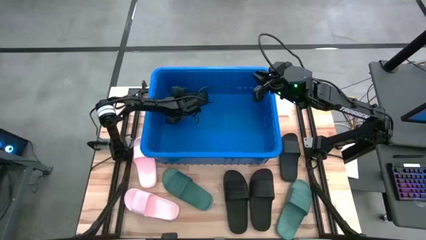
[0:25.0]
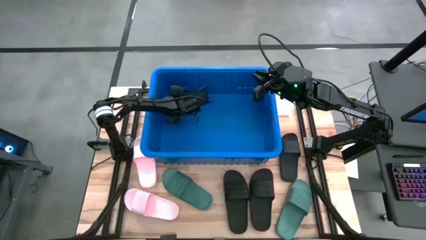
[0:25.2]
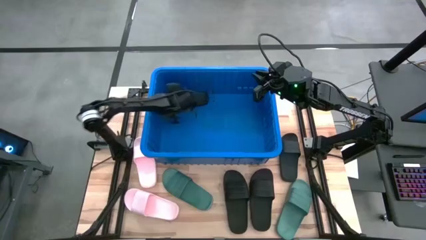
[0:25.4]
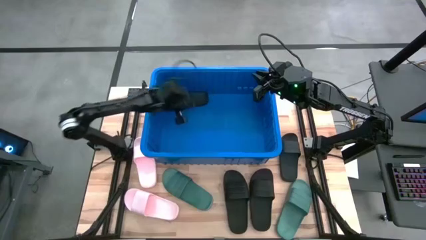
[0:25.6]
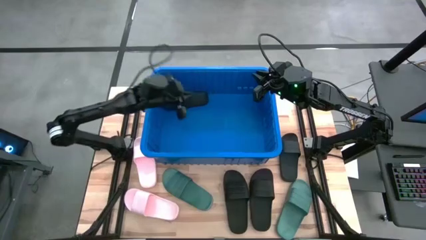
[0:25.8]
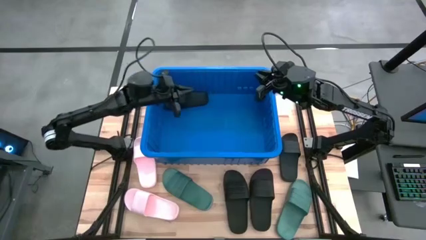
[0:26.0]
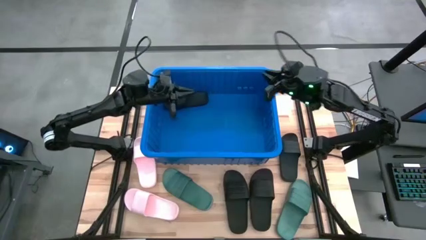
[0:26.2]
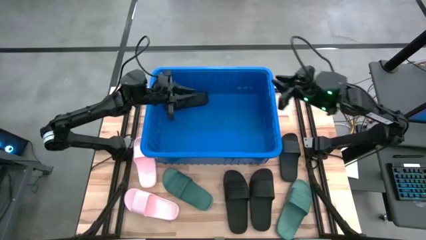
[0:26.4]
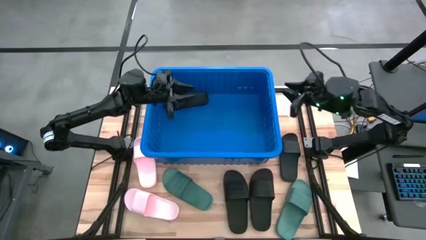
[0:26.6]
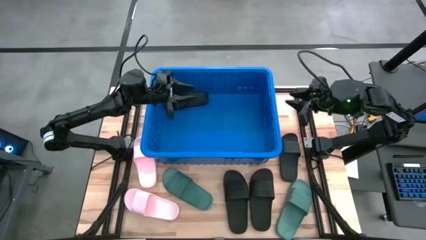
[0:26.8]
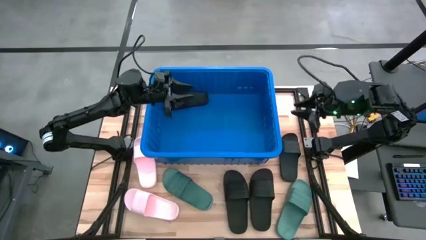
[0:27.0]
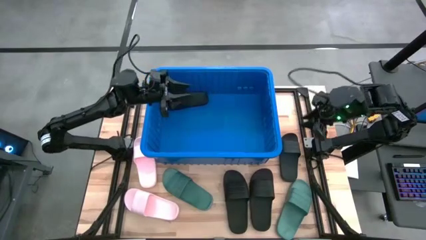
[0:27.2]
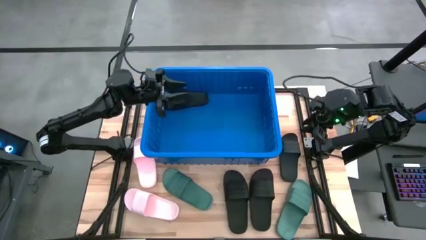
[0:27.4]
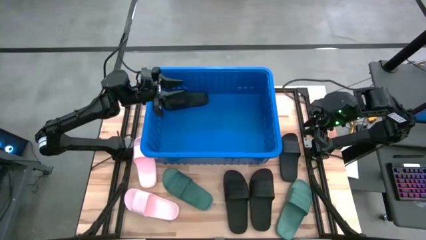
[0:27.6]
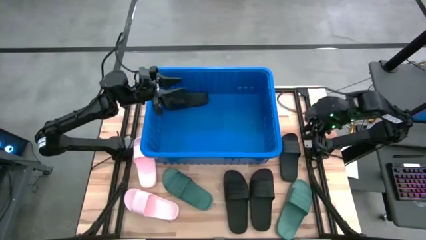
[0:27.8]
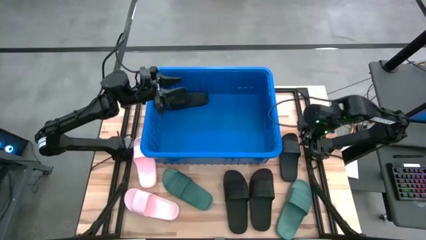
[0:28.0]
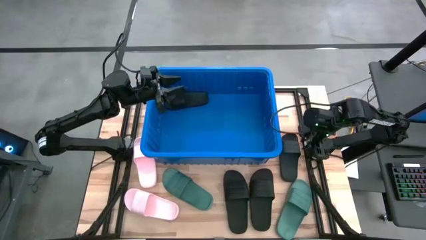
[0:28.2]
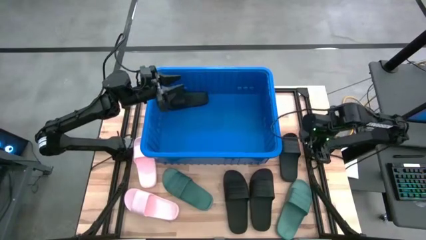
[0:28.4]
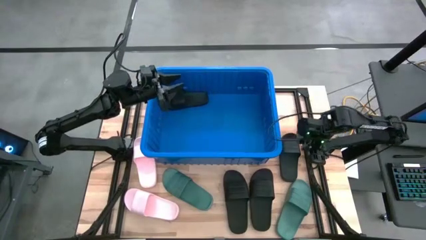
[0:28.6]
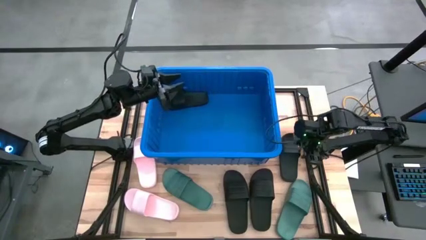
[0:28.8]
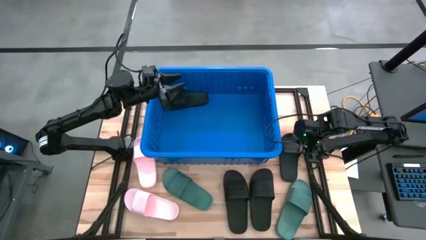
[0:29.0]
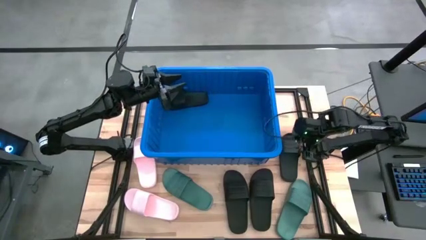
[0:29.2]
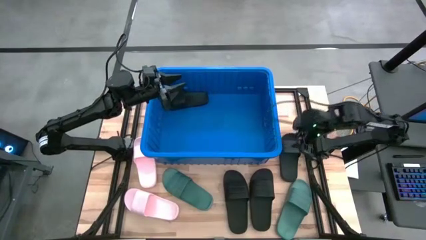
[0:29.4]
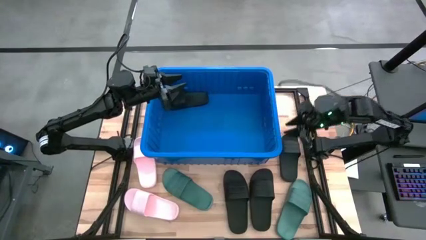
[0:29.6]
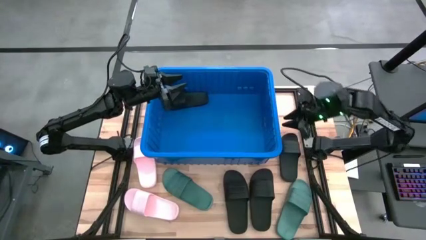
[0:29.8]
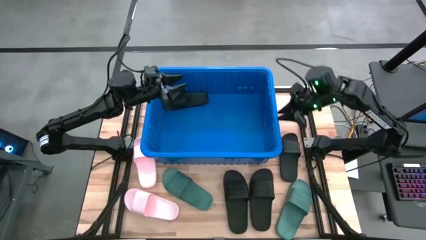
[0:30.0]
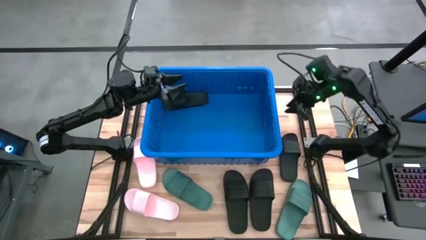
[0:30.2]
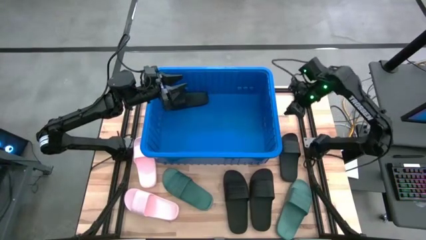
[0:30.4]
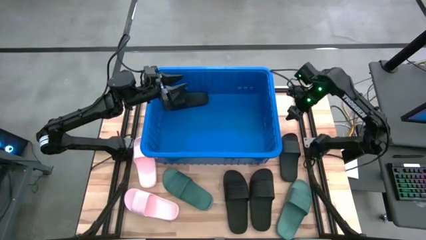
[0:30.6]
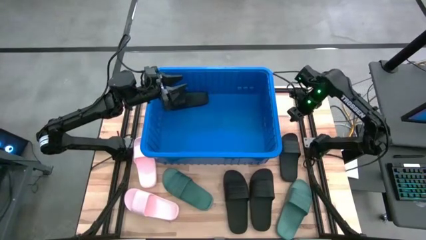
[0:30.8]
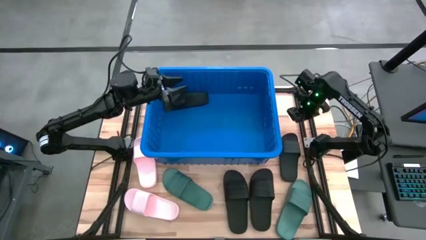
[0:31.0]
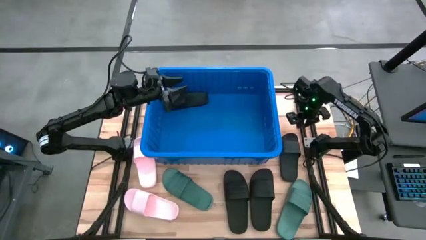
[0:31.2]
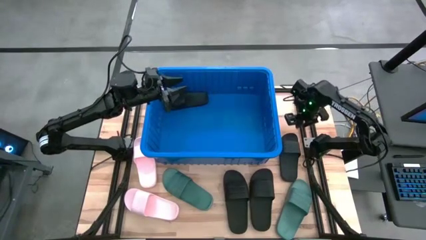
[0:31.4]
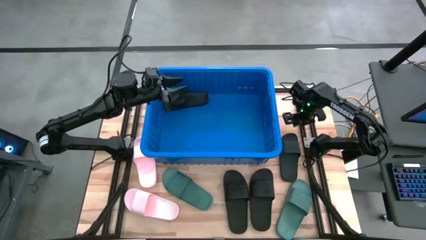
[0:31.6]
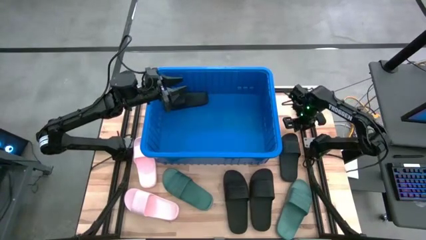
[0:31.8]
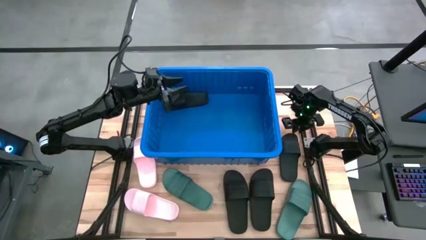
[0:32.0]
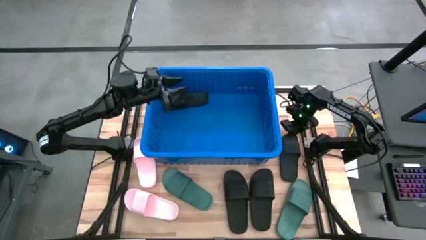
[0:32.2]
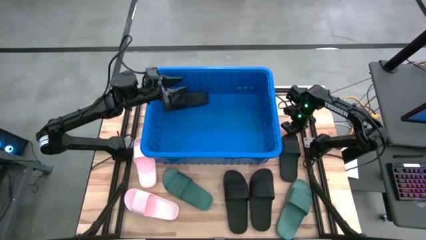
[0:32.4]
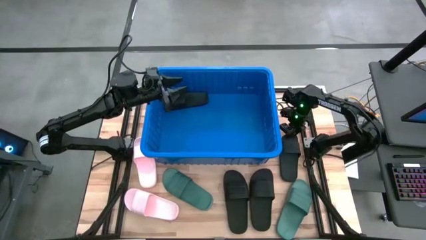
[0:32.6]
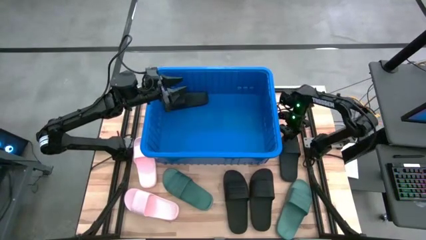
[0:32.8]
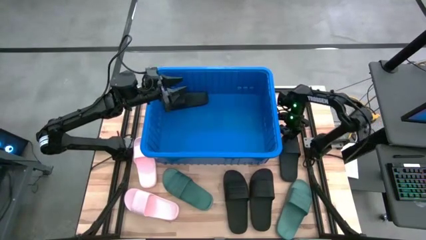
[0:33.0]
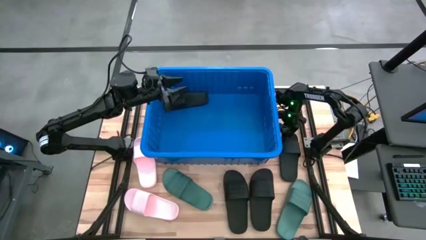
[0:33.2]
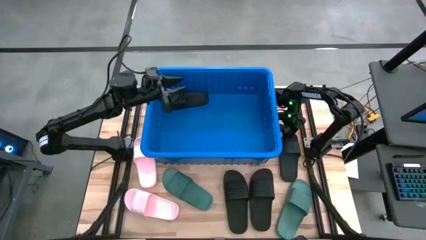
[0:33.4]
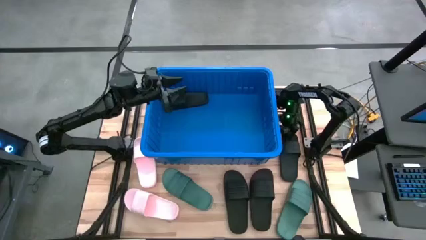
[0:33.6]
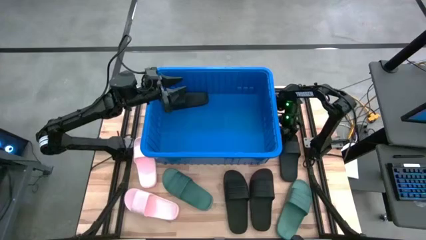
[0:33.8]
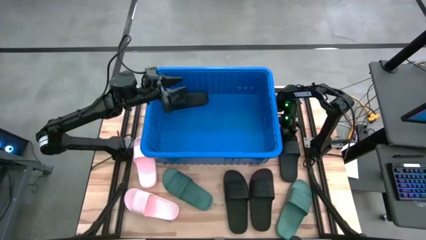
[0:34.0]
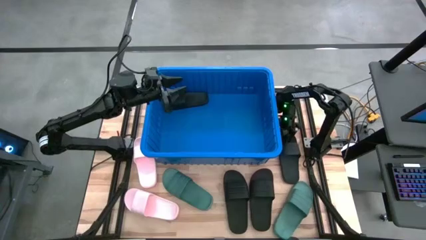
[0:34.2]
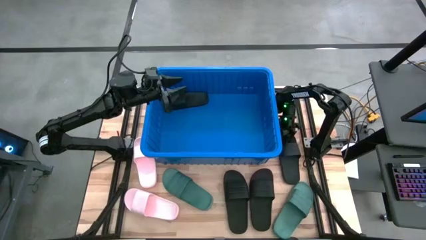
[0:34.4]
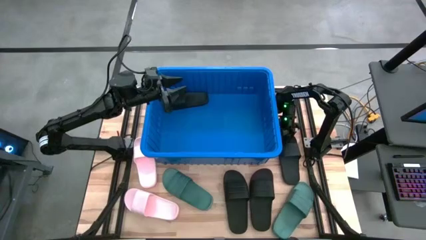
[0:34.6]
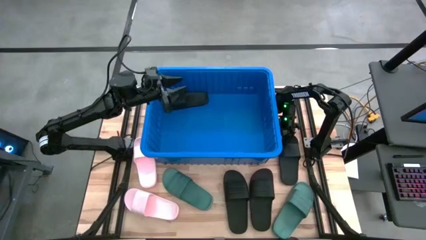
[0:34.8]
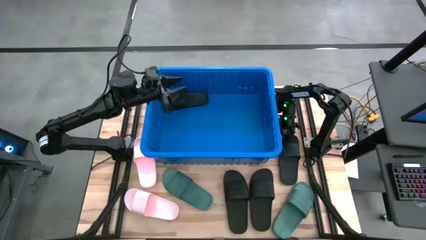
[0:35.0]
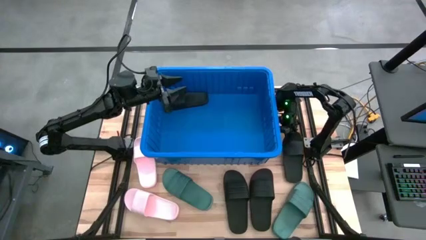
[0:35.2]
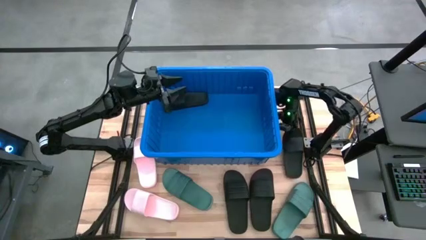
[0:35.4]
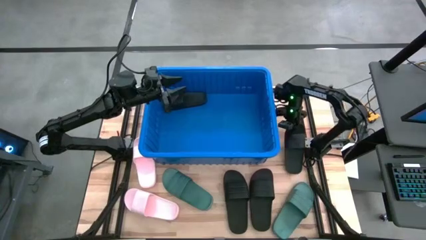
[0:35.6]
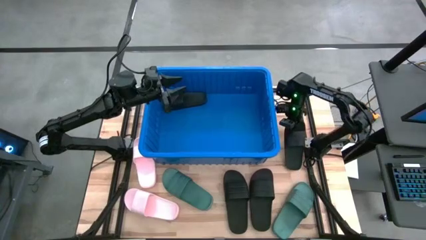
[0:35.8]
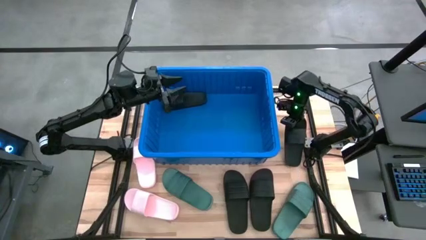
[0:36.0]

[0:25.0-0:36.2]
Task: Pick and place slides into bin
Put the black slide into the blue container
